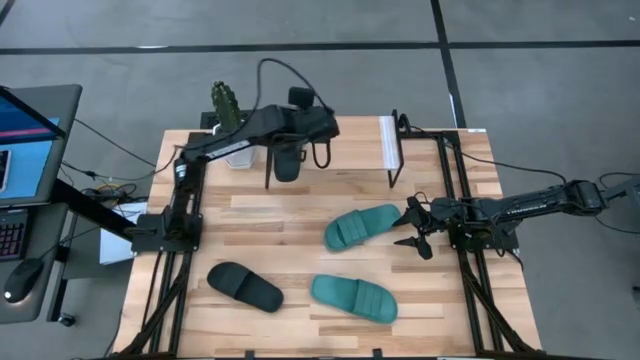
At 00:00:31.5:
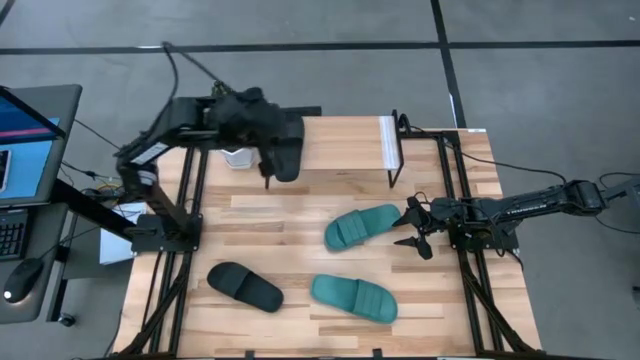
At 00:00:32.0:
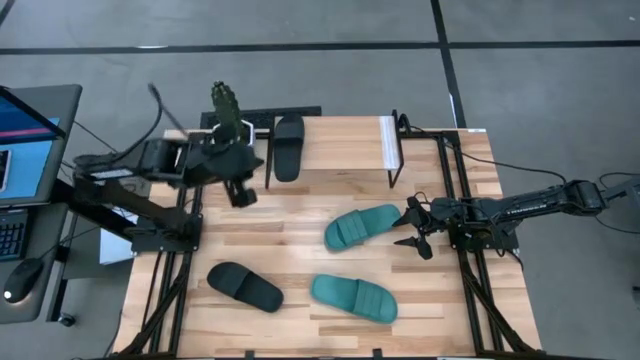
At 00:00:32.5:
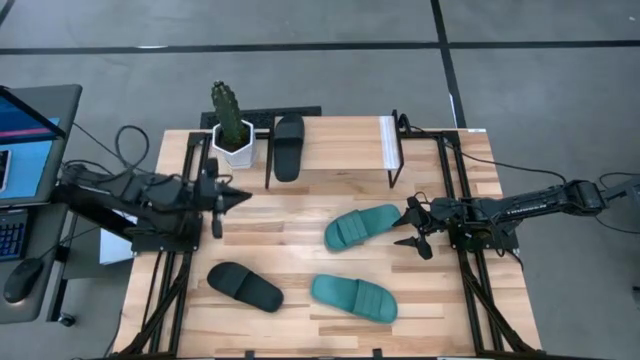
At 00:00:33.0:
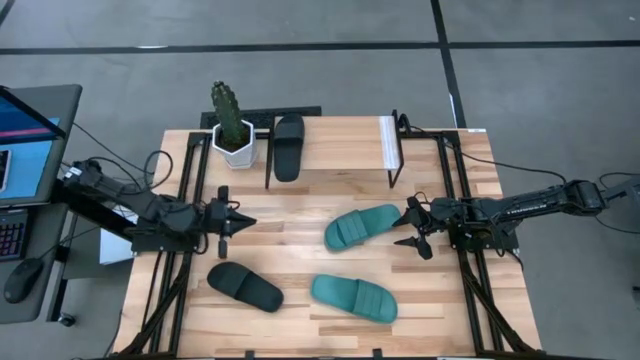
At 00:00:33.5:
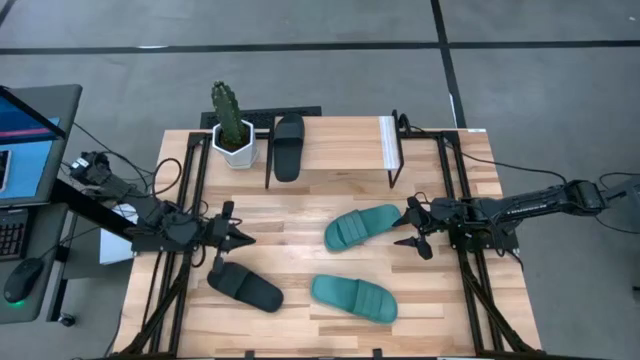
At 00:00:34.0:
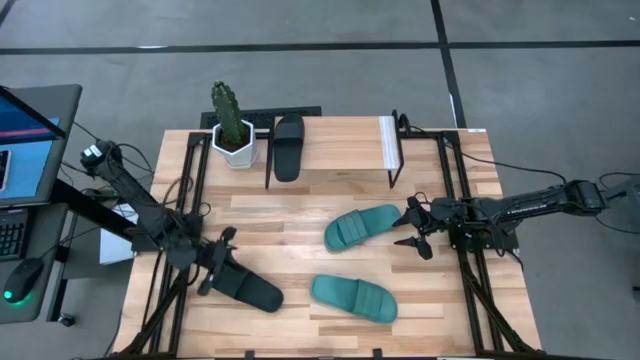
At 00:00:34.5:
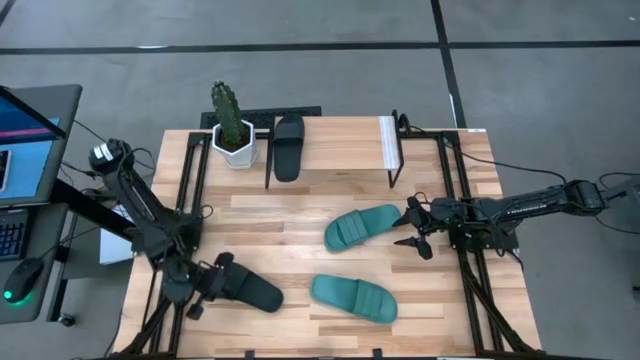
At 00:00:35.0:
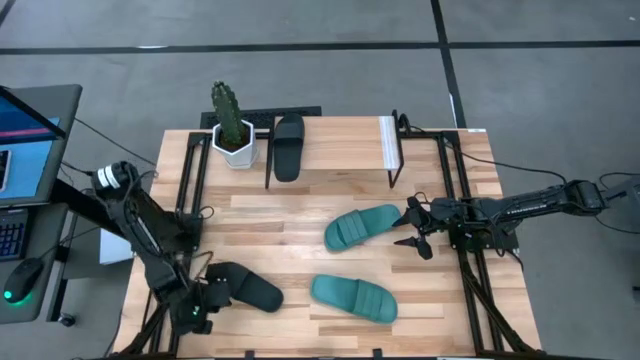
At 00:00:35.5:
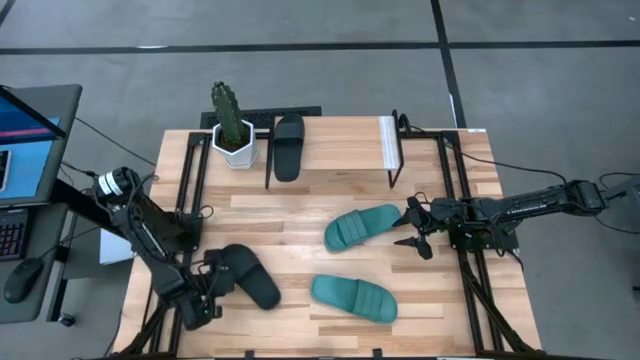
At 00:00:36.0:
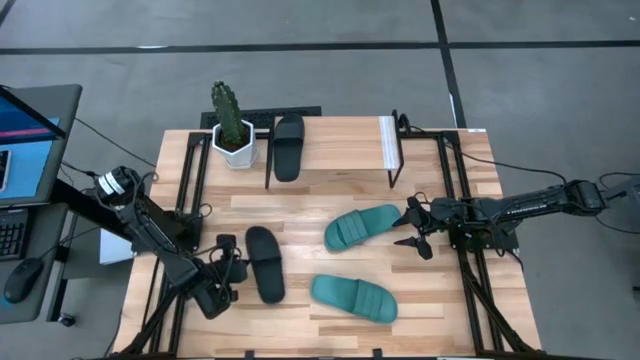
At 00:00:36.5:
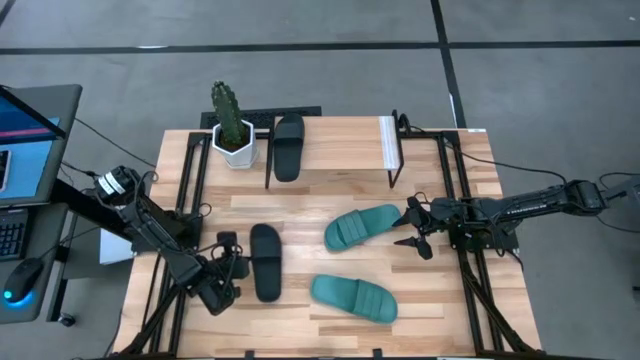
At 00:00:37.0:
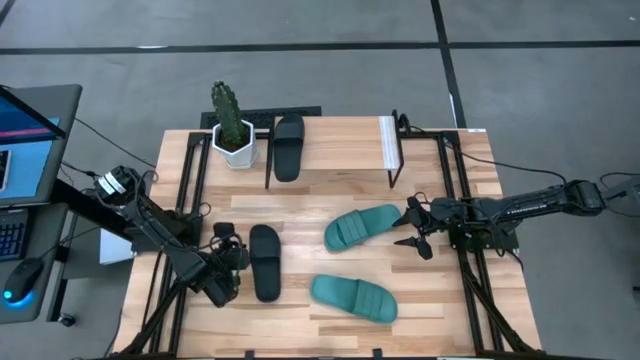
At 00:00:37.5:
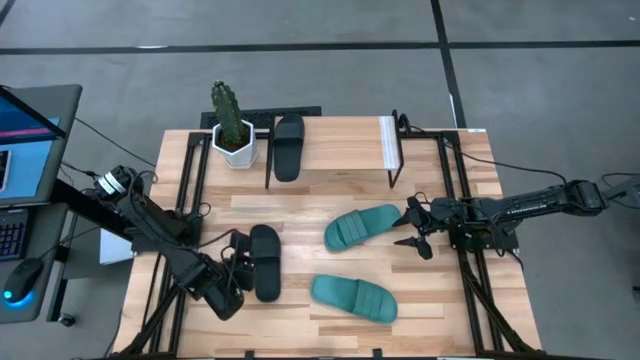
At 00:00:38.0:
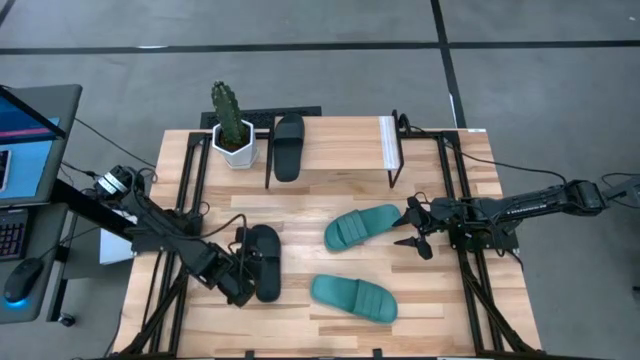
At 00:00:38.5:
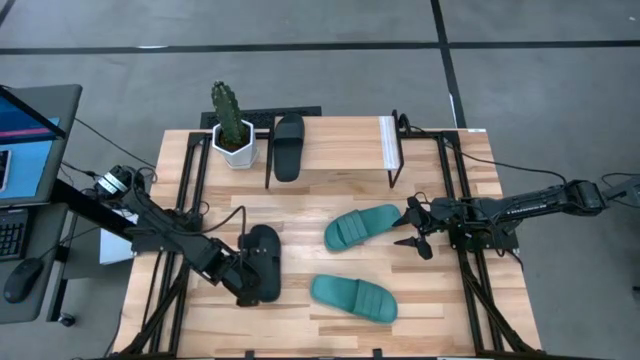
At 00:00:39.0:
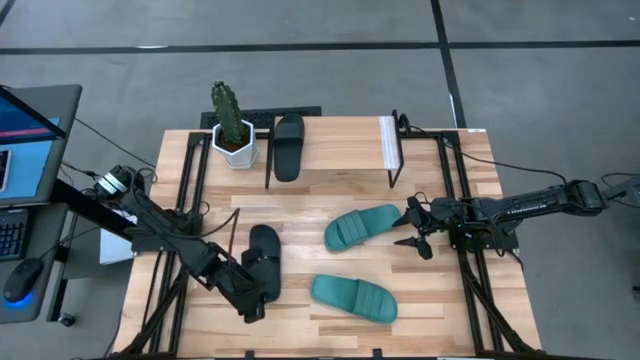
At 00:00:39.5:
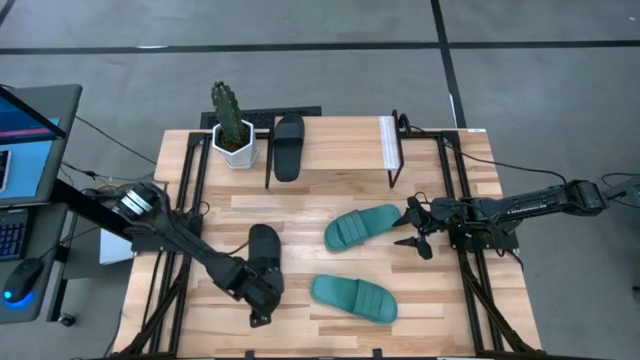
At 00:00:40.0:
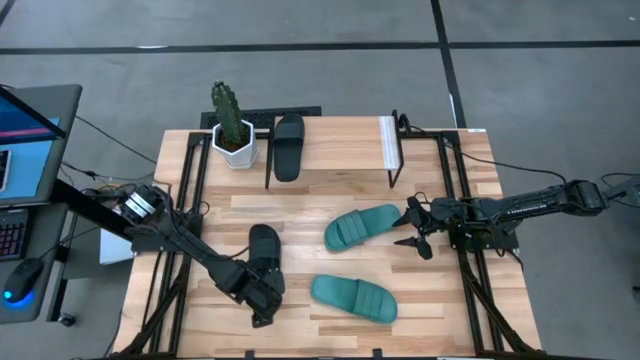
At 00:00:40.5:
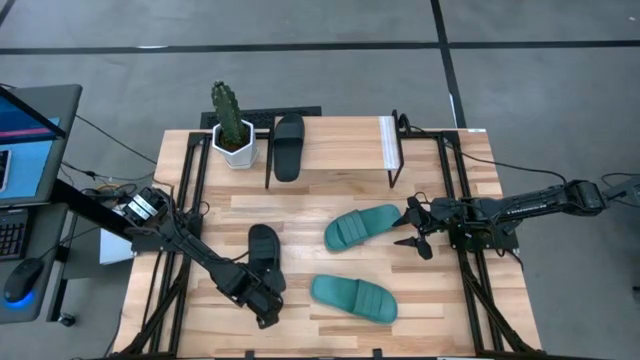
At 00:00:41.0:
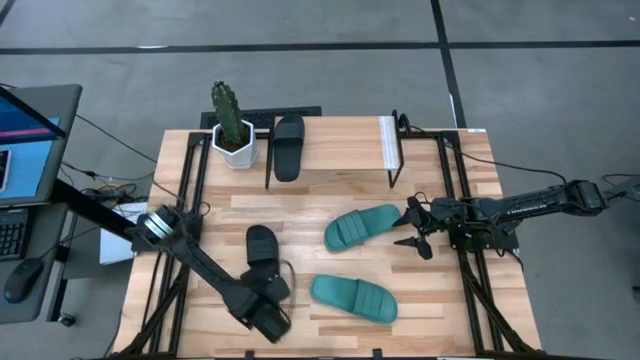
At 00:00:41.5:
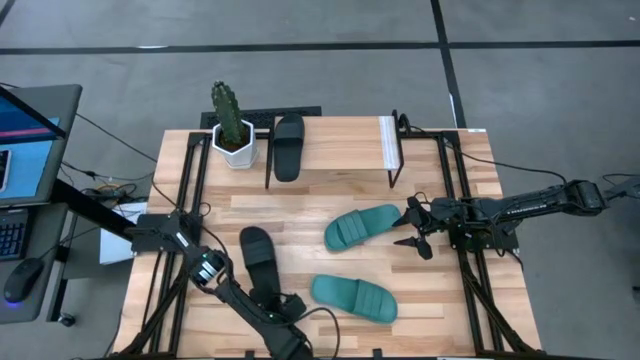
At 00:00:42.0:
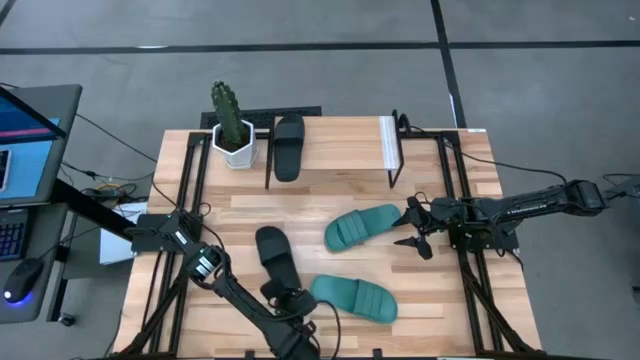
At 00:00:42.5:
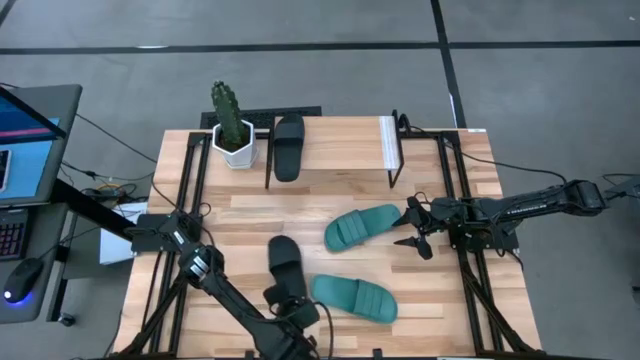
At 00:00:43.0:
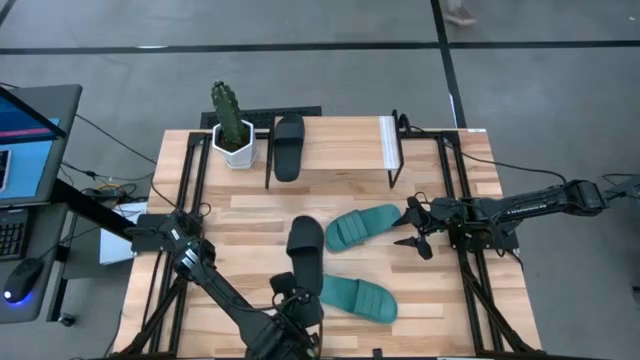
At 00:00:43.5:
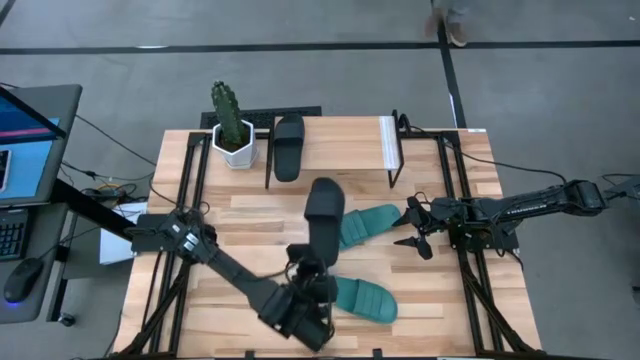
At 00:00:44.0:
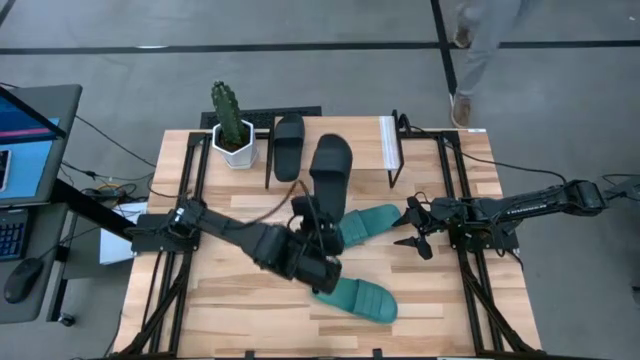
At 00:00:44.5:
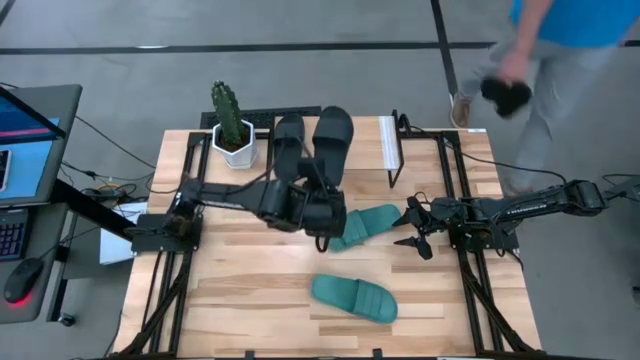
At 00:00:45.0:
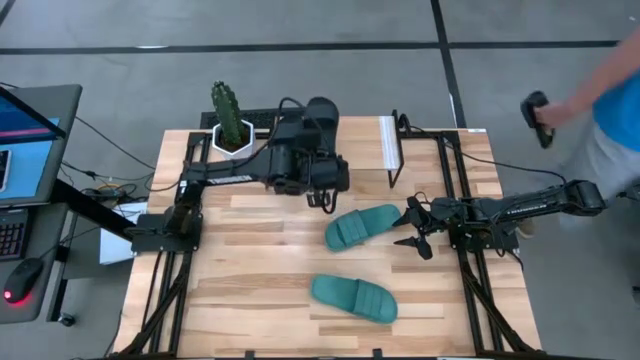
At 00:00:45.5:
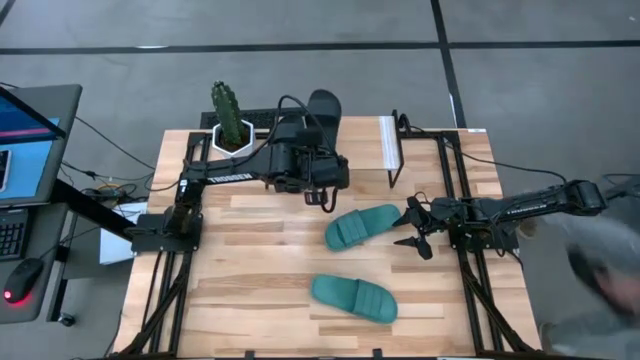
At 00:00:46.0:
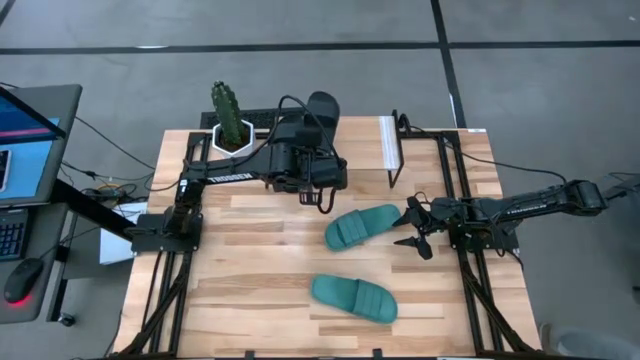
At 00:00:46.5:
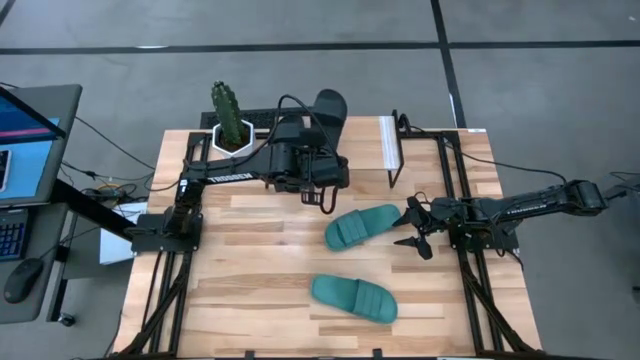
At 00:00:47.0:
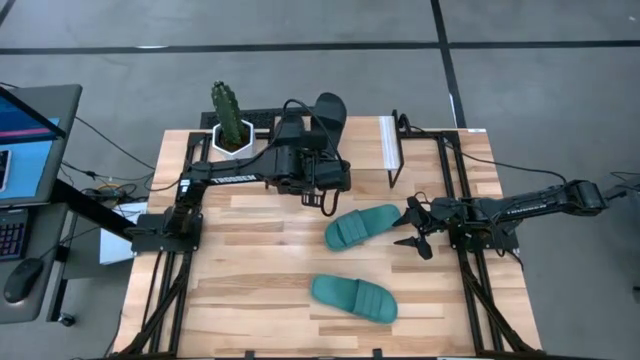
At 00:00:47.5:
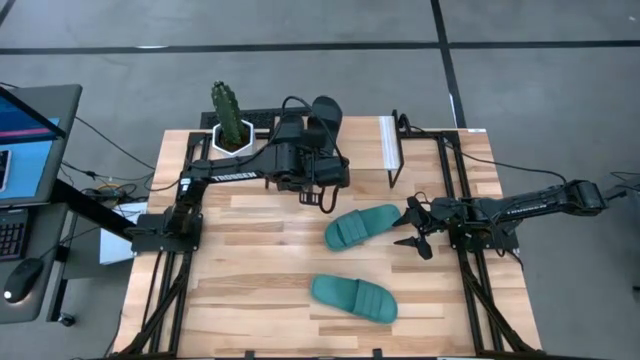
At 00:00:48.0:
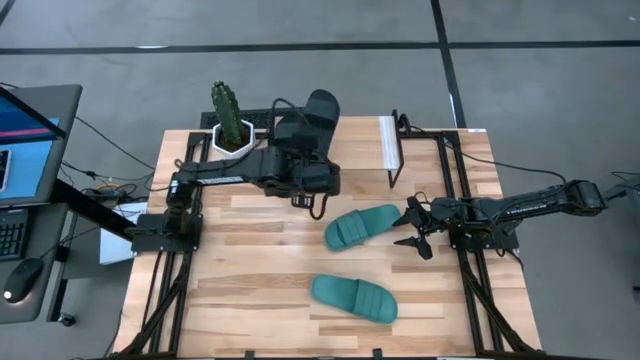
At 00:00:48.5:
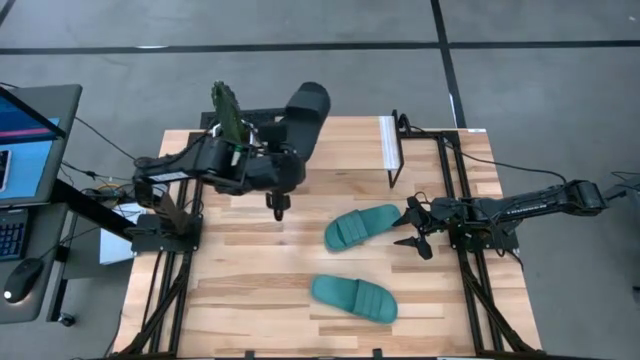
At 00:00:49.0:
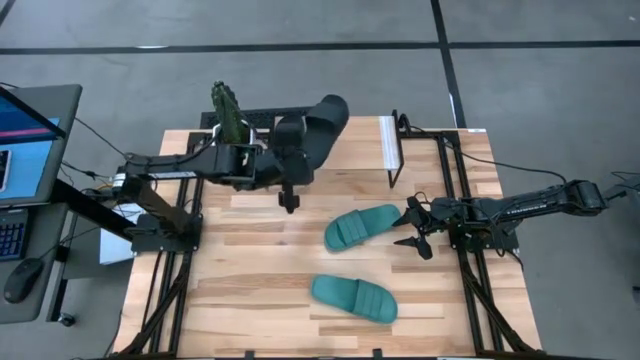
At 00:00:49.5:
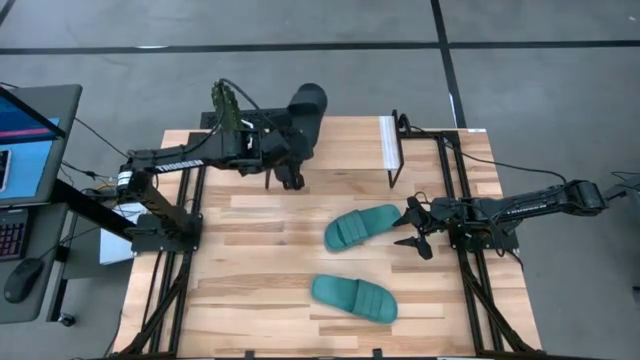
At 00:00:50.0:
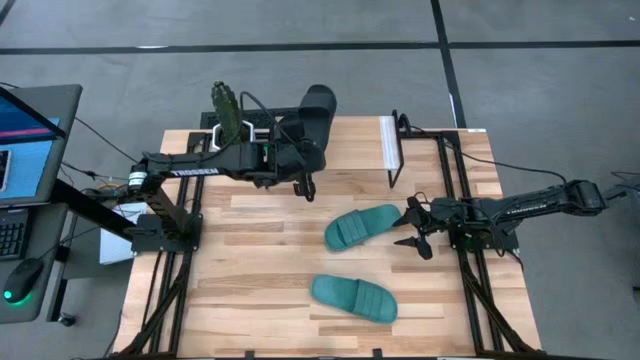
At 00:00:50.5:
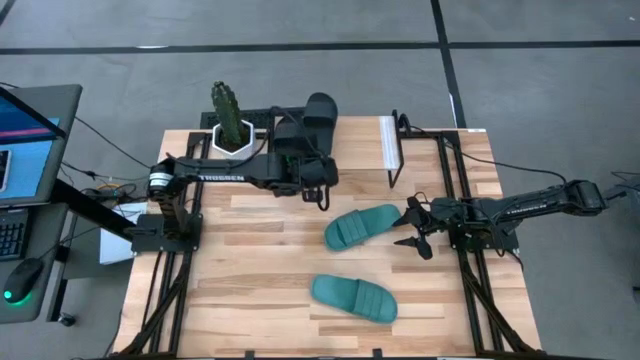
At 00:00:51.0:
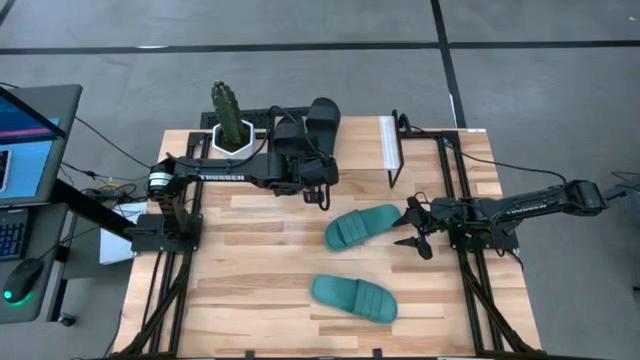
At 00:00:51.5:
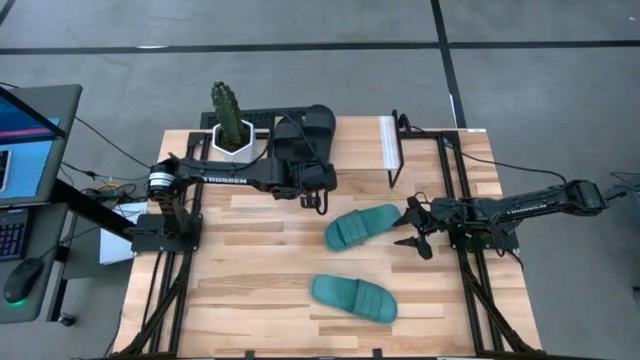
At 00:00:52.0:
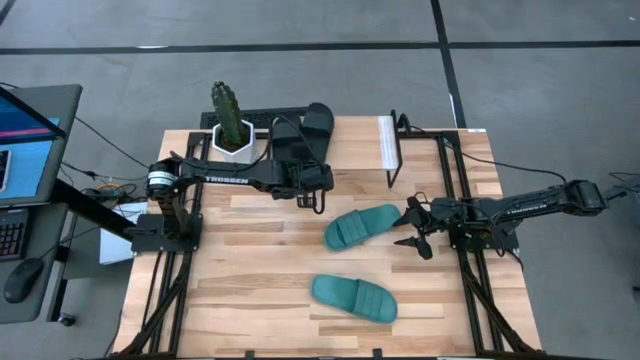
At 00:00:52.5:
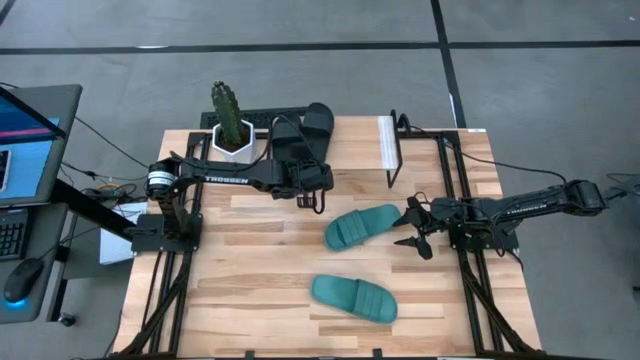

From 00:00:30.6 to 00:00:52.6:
Task: Pick and place slides into the shelf
Put the black slide on the shelf
